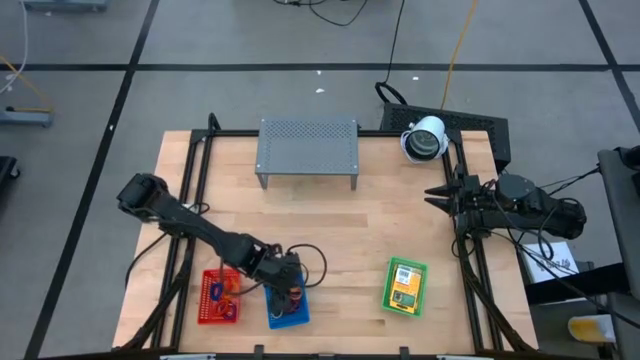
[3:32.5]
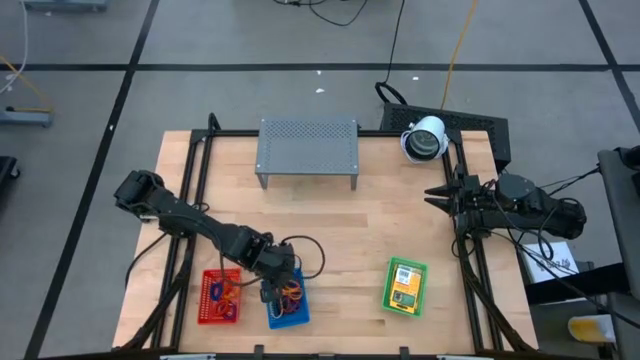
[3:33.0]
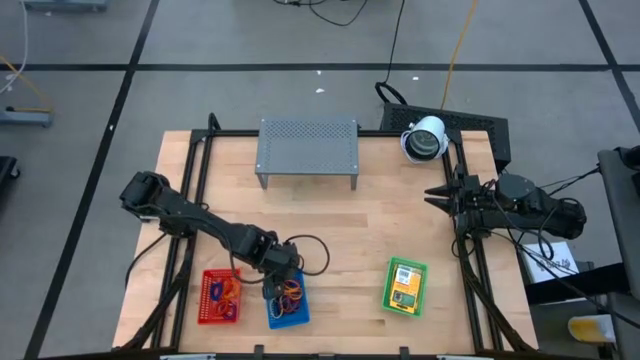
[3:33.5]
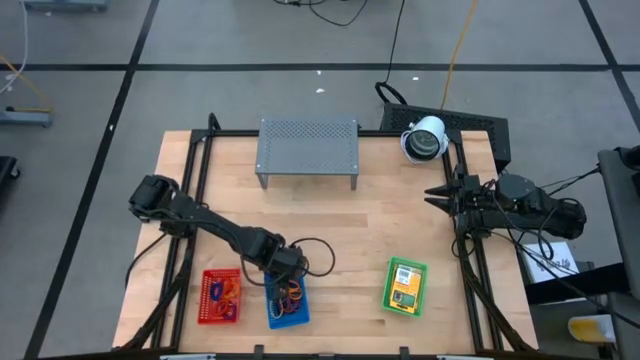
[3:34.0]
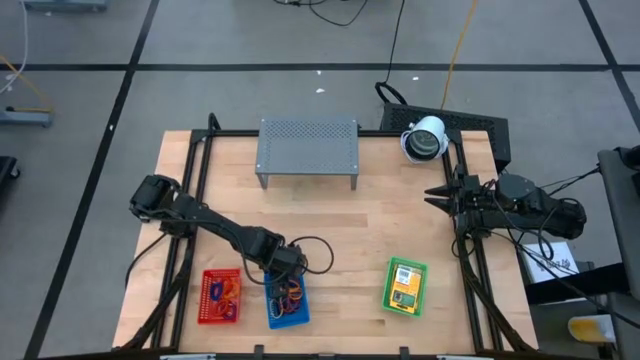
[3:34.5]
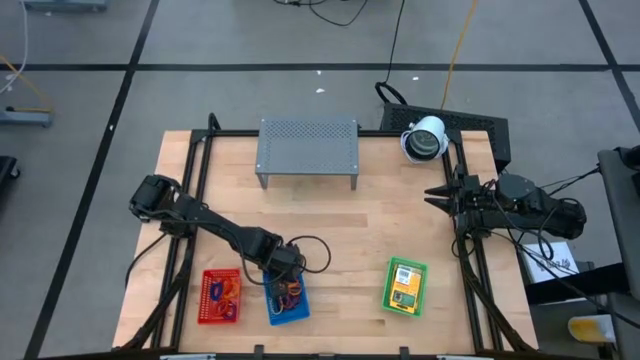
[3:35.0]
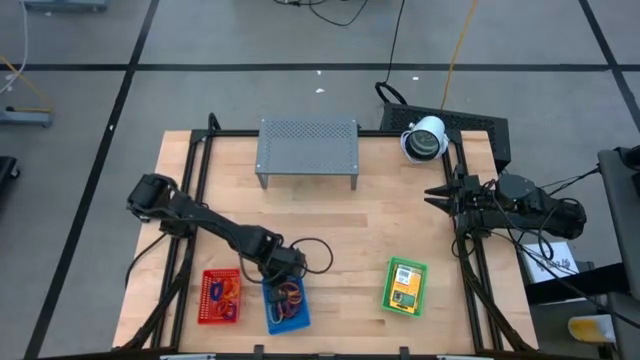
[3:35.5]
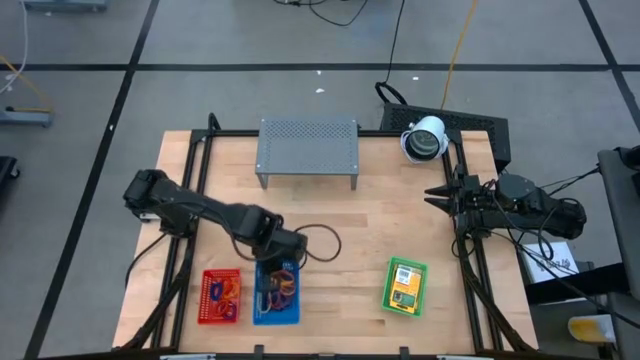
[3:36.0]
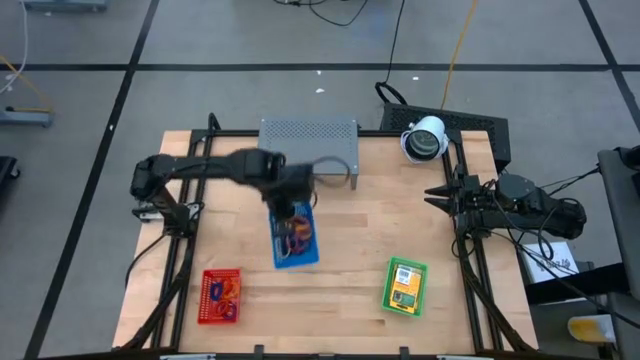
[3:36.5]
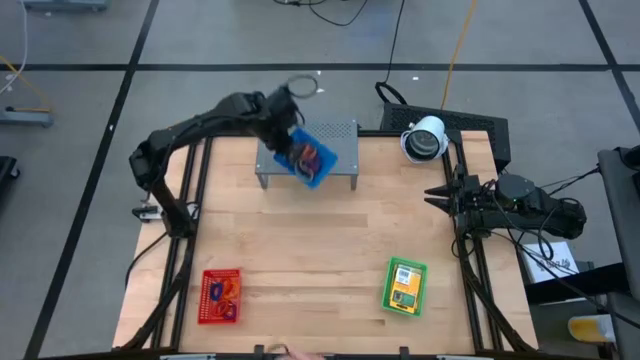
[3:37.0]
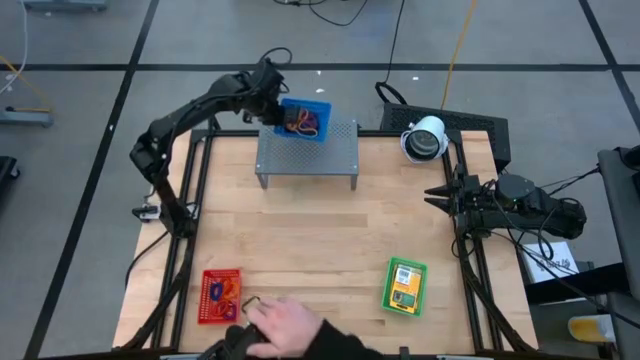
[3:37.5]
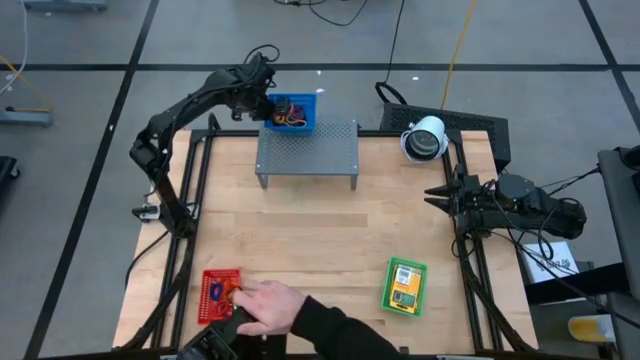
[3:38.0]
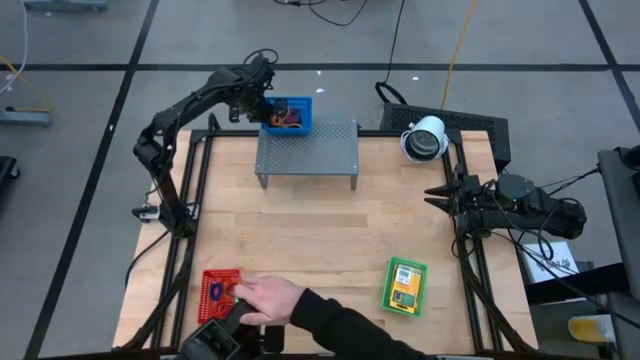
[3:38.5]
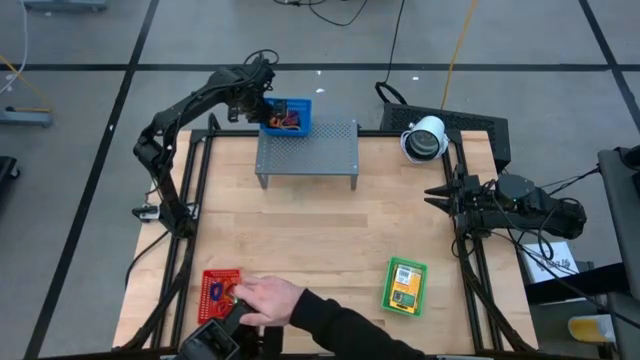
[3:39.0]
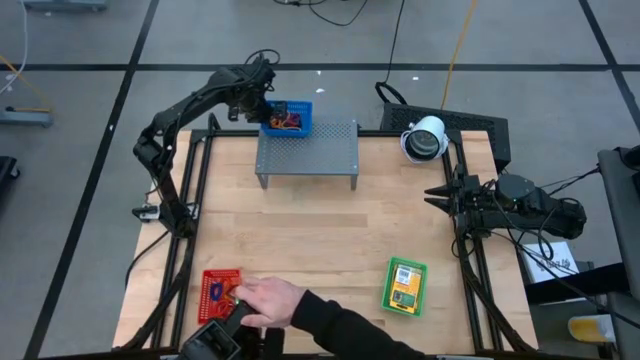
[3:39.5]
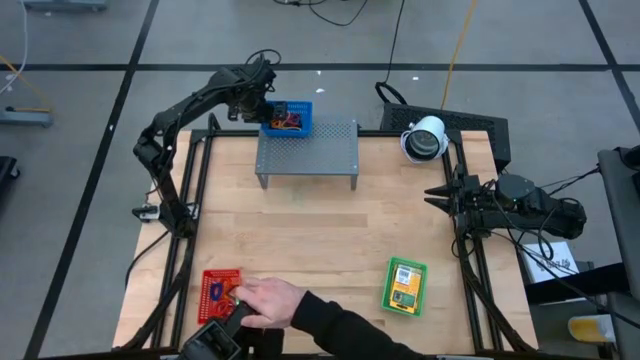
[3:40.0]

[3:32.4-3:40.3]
Task: Pick & Place Office Desk Supplies
Put the blue bin on the shelf

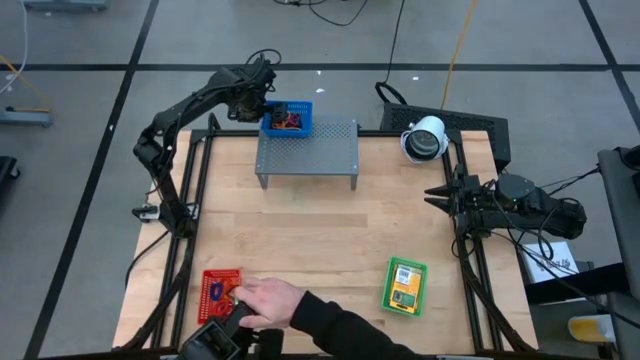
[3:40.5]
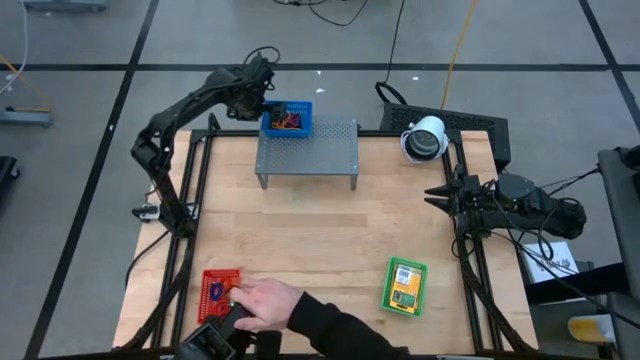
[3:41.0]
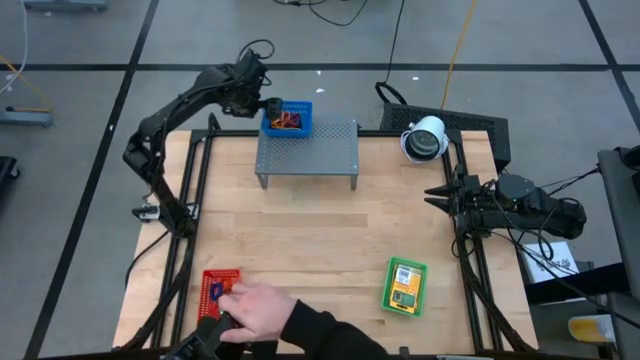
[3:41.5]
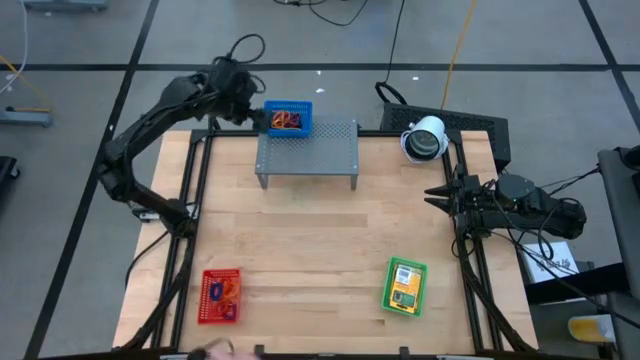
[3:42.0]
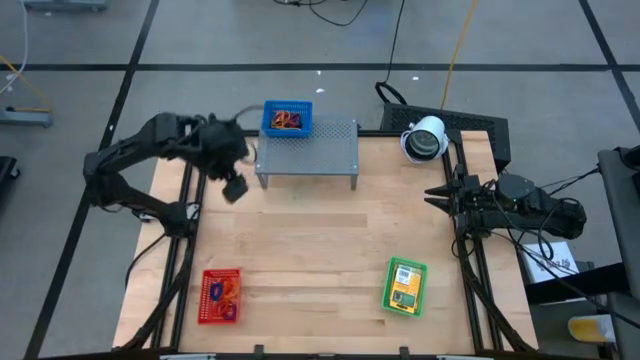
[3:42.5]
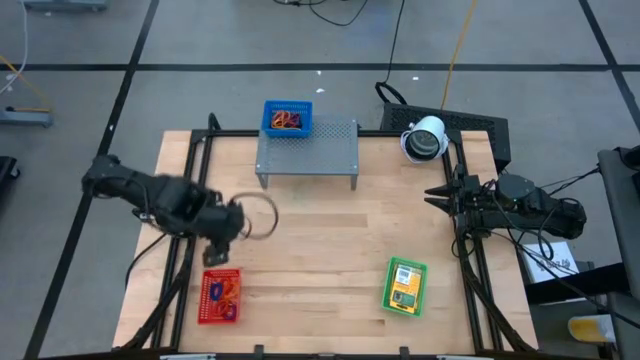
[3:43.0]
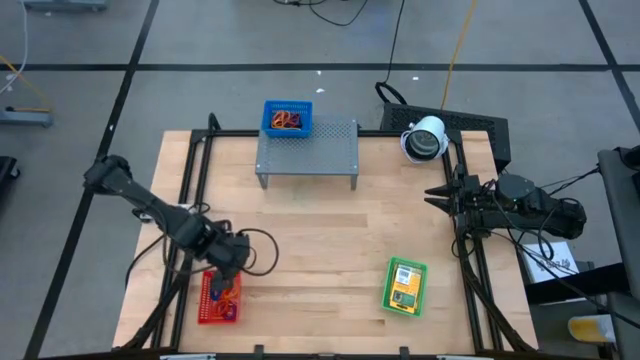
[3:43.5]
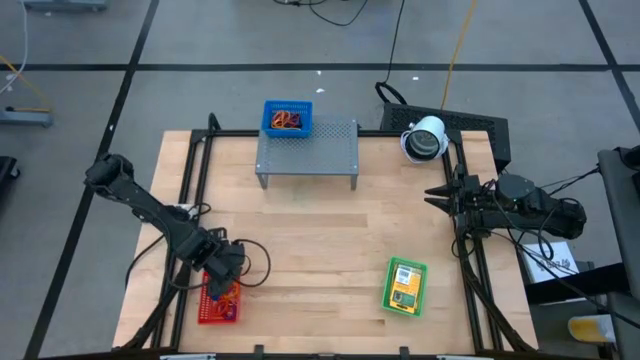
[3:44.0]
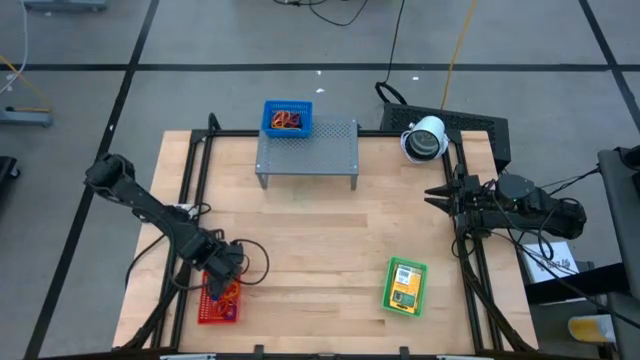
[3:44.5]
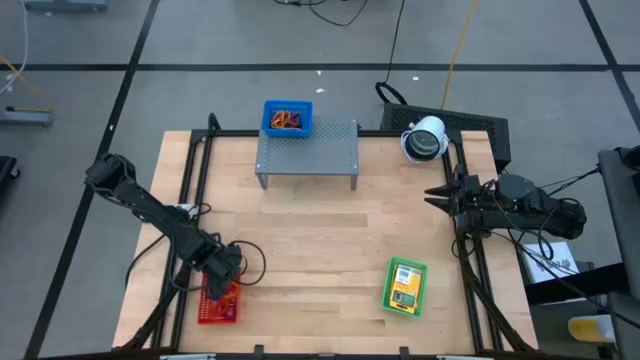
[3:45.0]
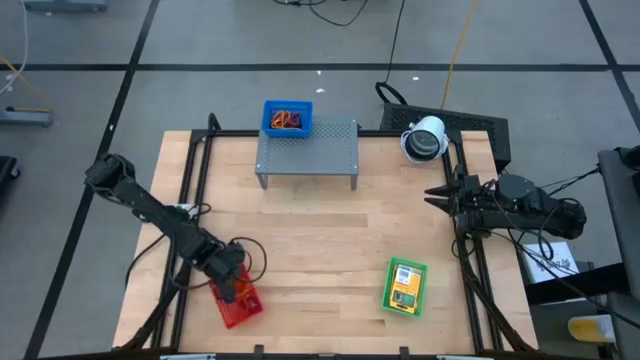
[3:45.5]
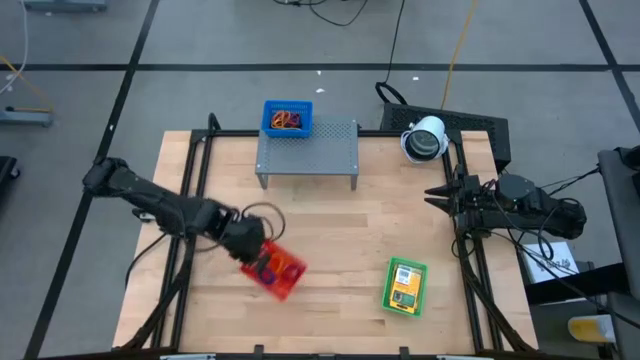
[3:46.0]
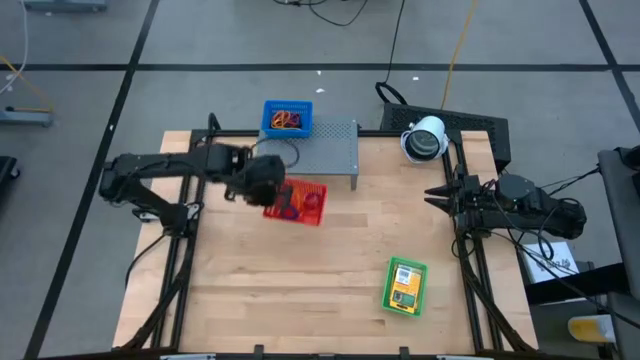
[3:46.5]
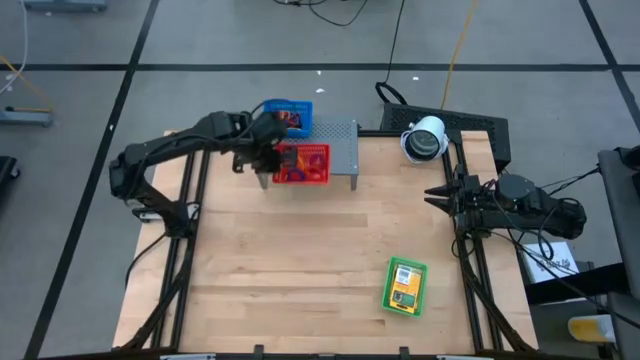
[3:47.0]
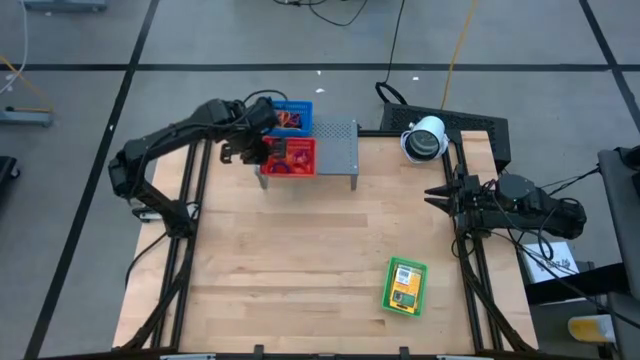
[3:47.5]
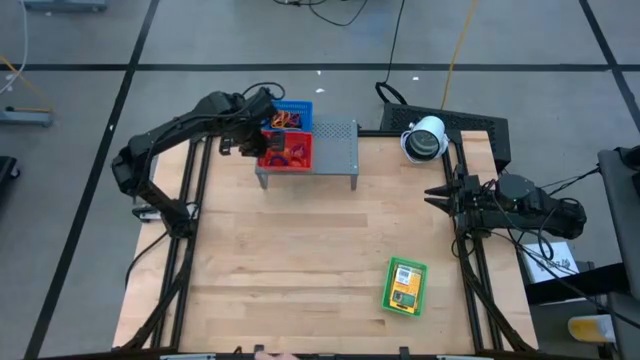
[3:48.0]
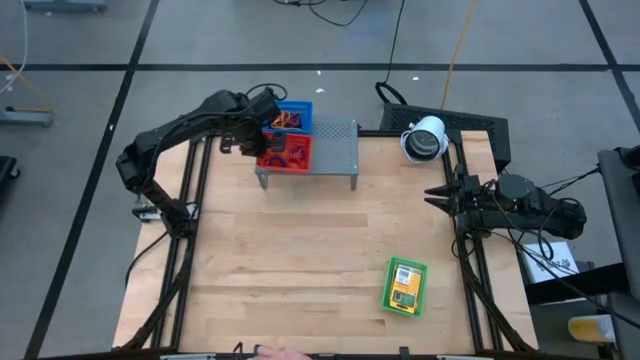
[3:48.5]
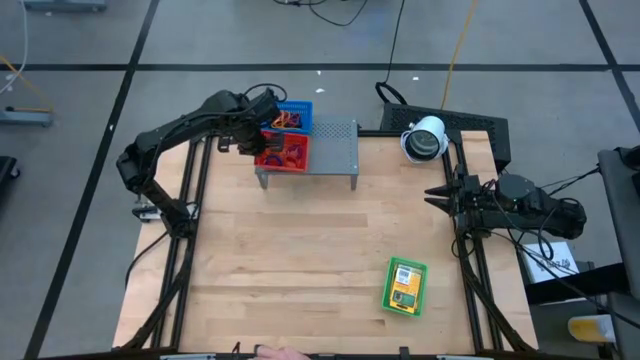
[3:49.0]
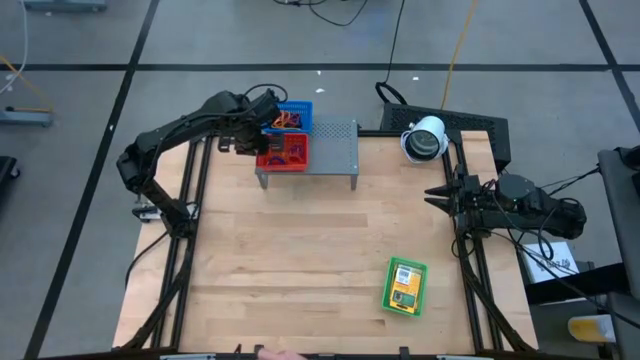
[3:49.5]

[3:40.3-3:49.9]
Put the red bin on the shelf

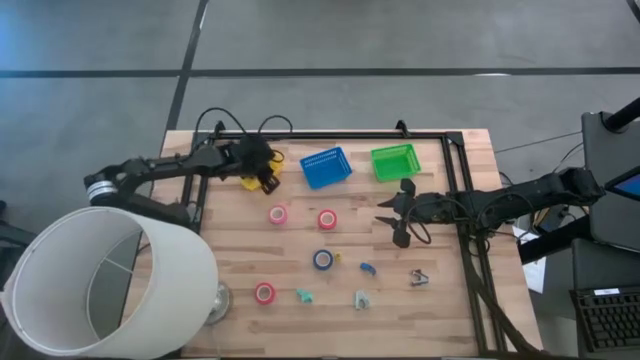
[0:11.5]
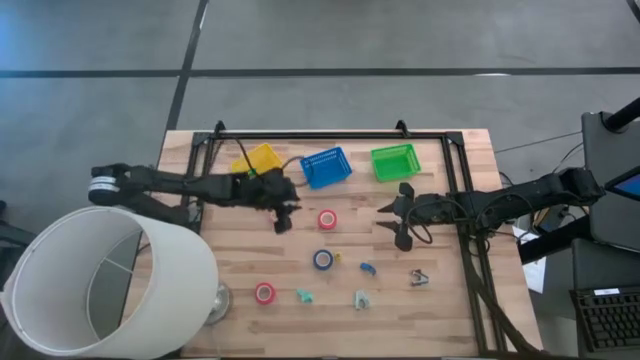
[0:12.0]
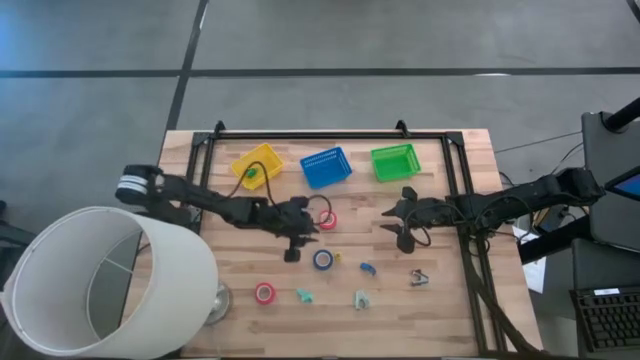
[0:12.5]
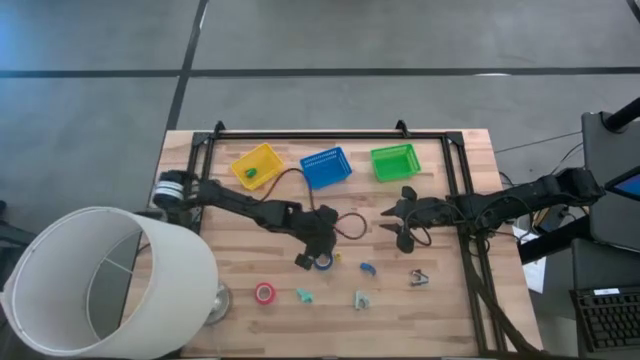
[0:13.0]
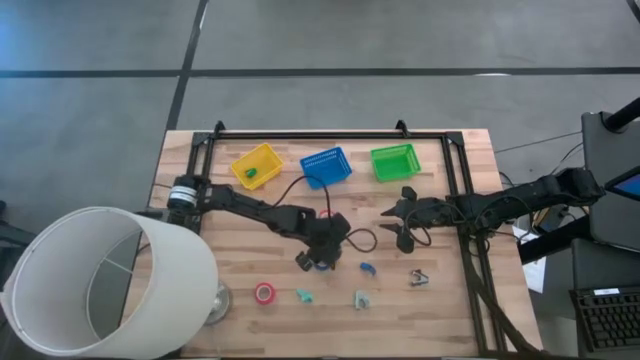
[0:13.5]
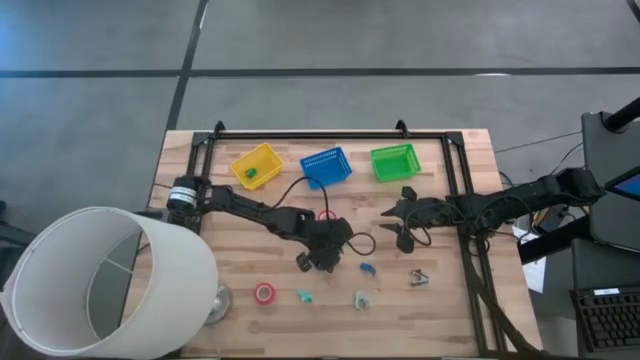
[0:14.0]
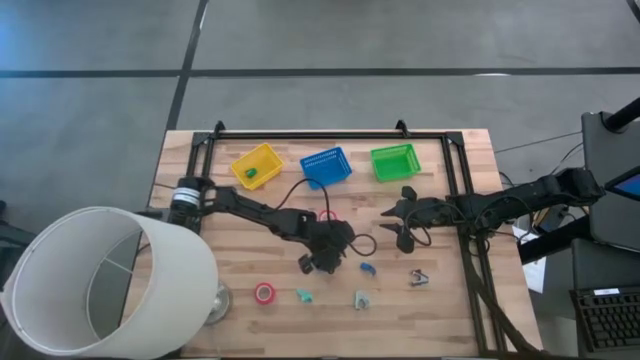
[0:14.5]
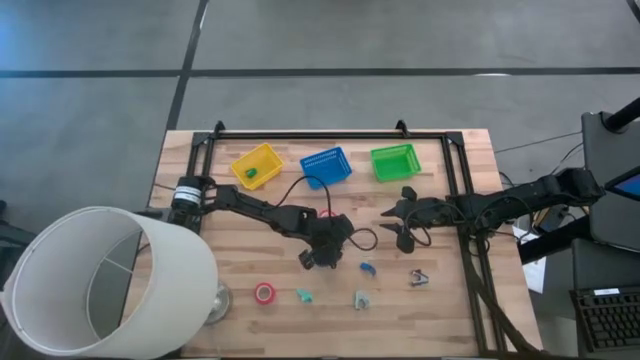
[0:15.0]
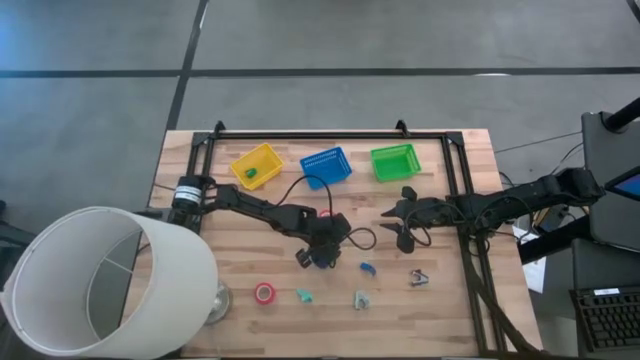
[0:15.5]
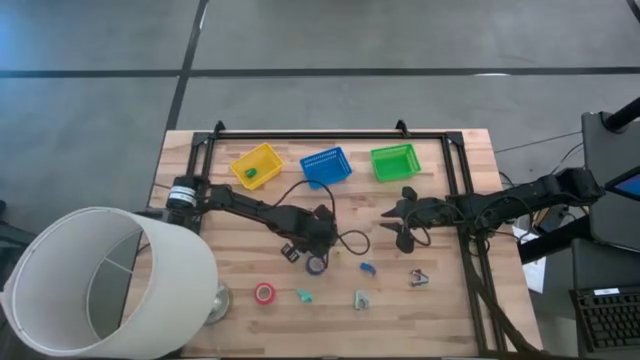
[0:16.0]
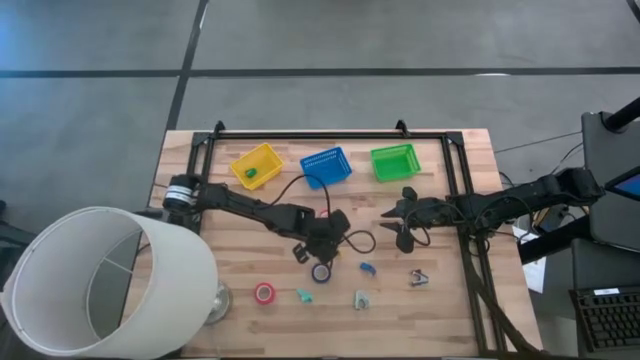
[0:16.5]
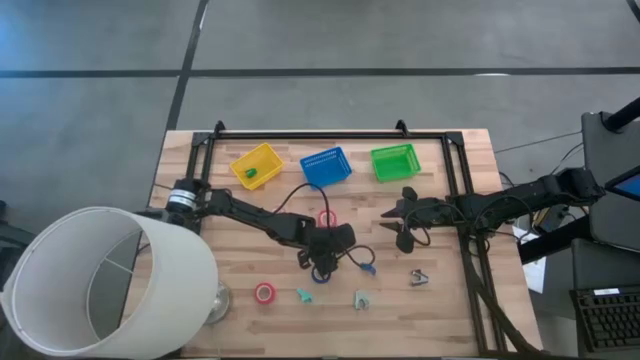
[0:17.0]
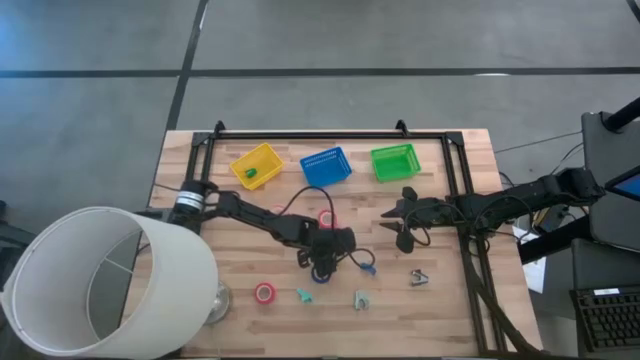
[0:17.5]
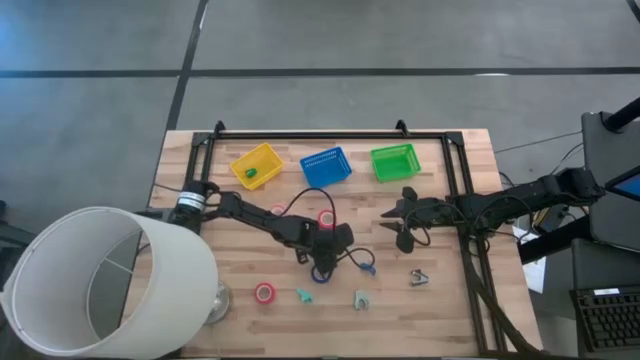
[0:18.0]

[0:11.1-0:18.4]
Task: Pick and place Stapler, Stapler remover, tape
Put the yellow stapler into the yellow basket
